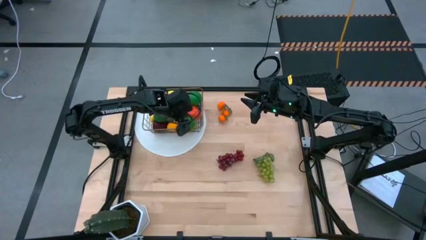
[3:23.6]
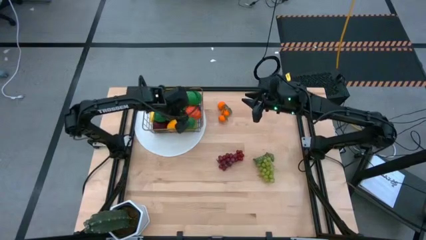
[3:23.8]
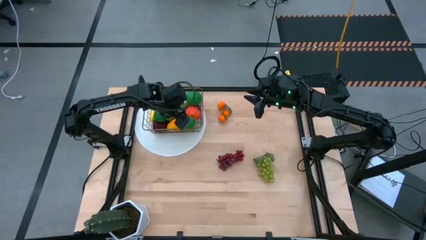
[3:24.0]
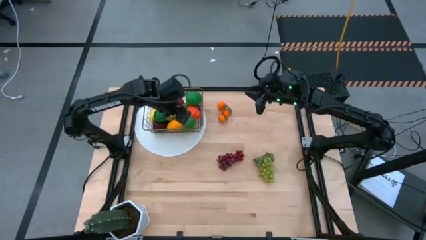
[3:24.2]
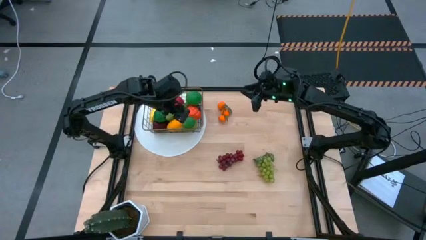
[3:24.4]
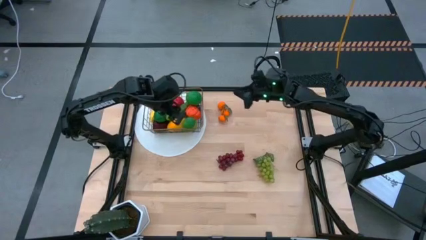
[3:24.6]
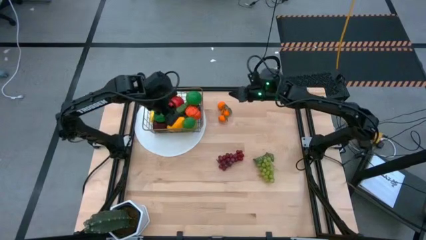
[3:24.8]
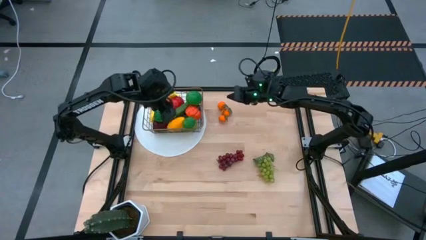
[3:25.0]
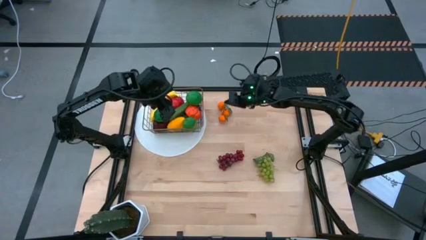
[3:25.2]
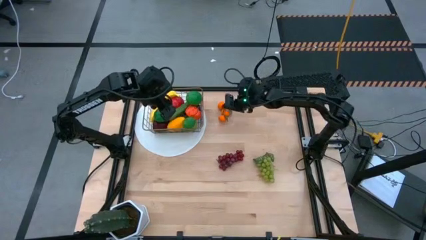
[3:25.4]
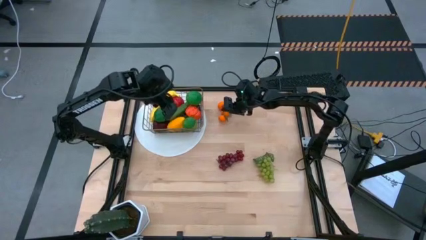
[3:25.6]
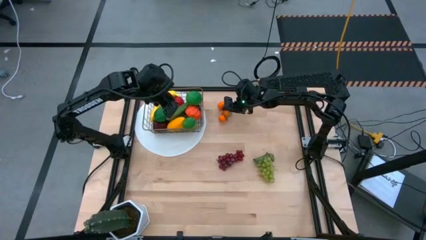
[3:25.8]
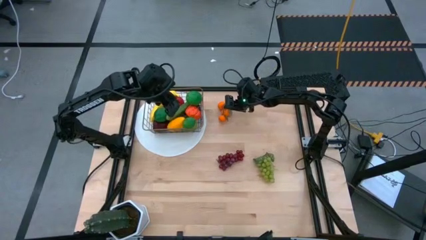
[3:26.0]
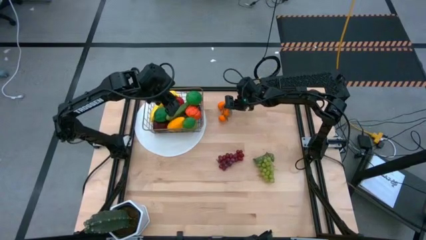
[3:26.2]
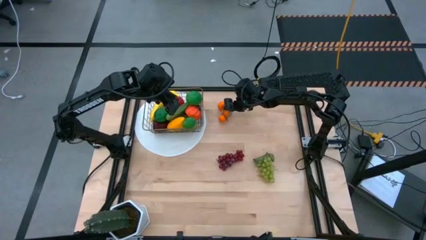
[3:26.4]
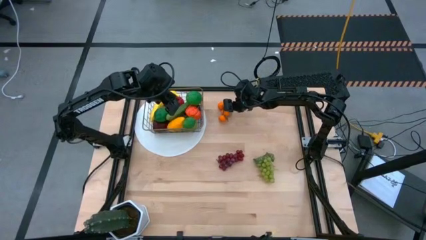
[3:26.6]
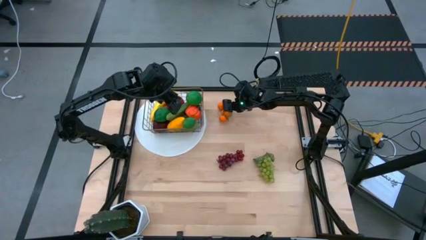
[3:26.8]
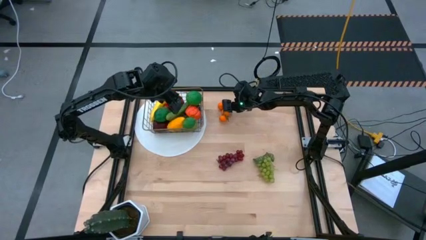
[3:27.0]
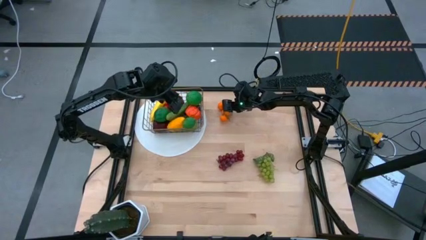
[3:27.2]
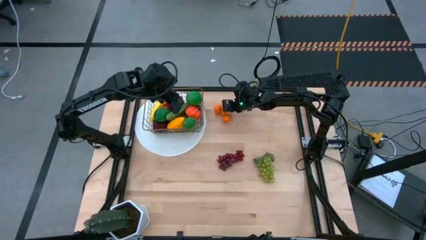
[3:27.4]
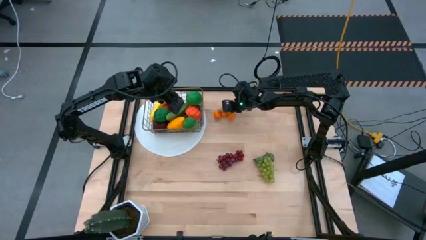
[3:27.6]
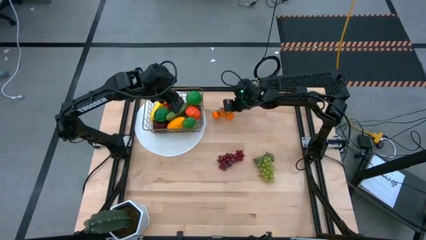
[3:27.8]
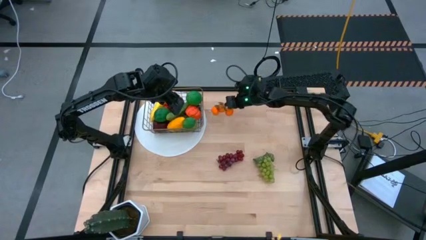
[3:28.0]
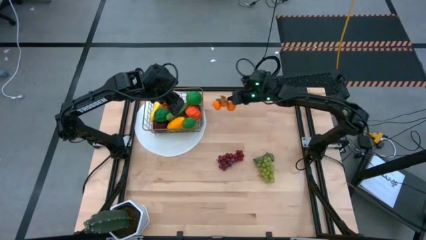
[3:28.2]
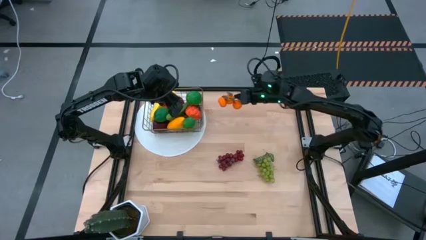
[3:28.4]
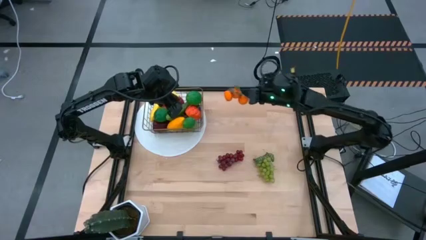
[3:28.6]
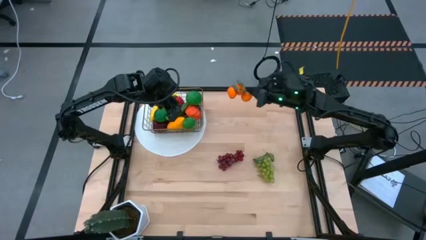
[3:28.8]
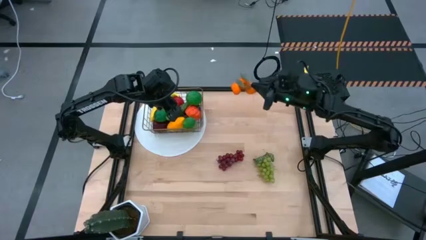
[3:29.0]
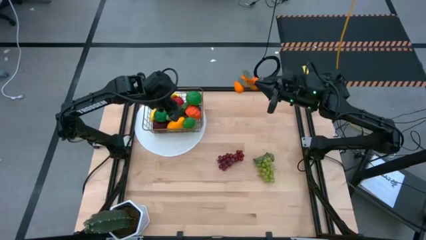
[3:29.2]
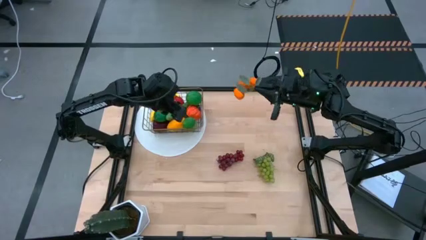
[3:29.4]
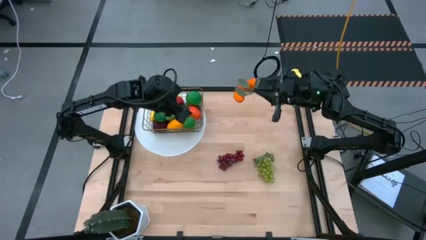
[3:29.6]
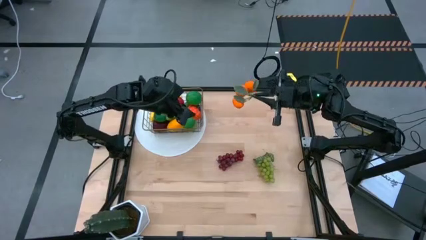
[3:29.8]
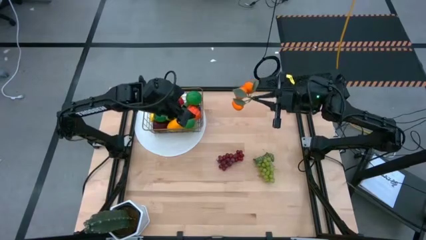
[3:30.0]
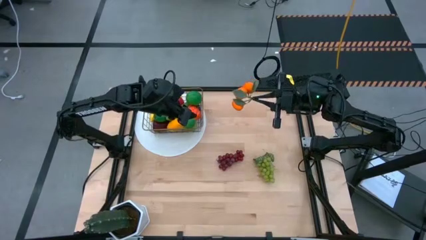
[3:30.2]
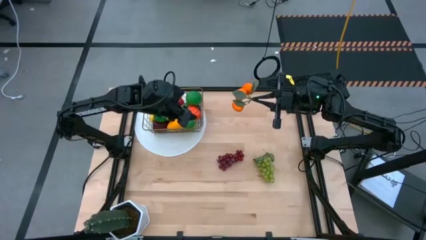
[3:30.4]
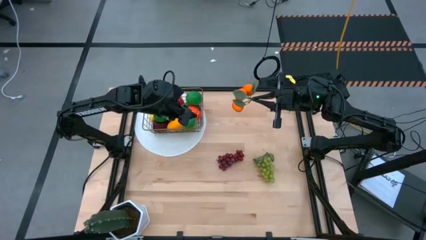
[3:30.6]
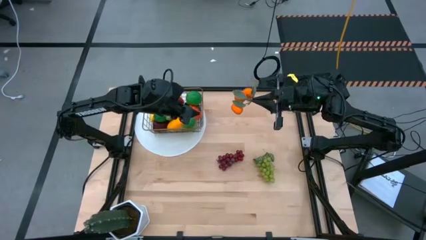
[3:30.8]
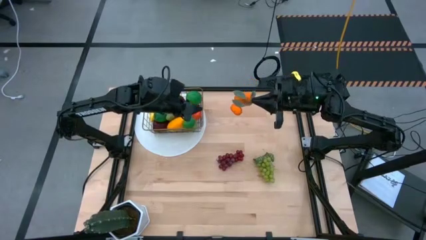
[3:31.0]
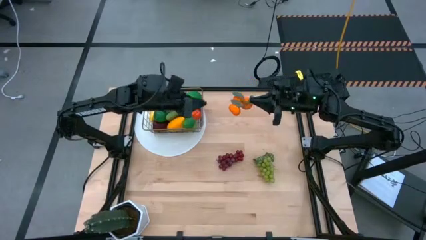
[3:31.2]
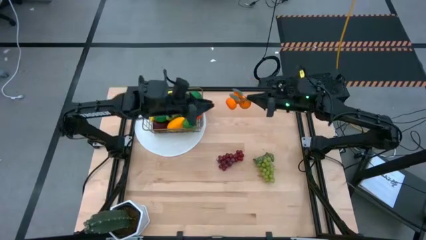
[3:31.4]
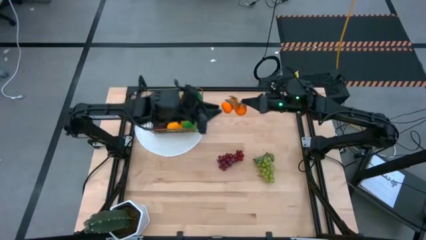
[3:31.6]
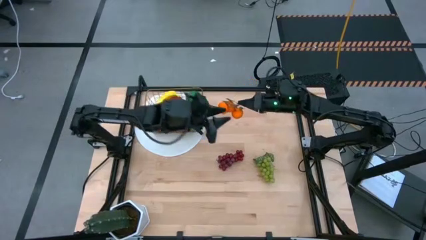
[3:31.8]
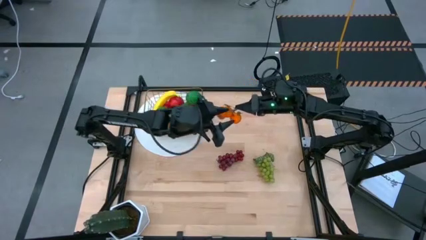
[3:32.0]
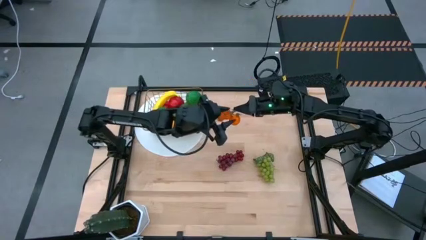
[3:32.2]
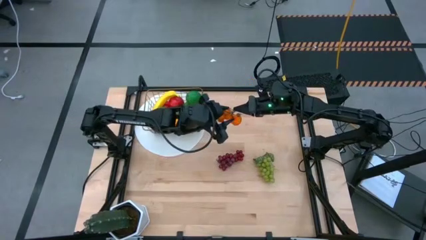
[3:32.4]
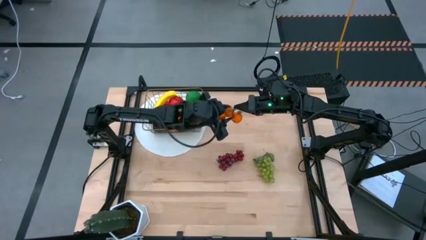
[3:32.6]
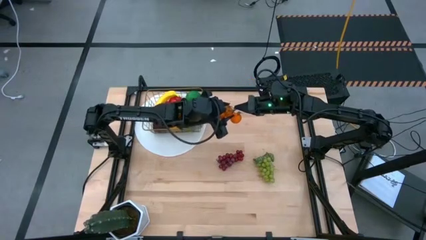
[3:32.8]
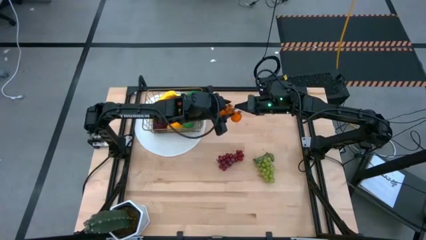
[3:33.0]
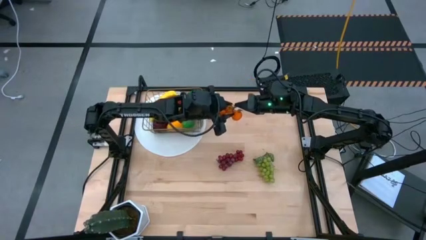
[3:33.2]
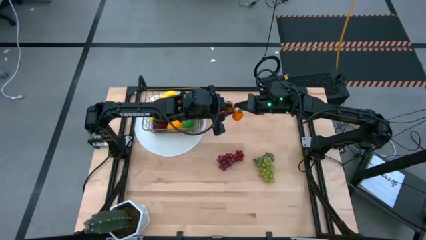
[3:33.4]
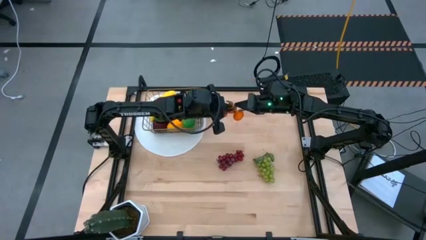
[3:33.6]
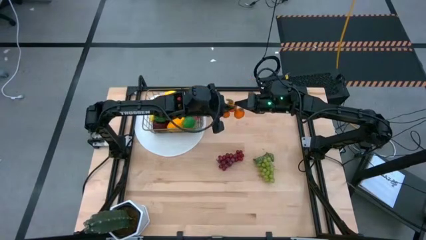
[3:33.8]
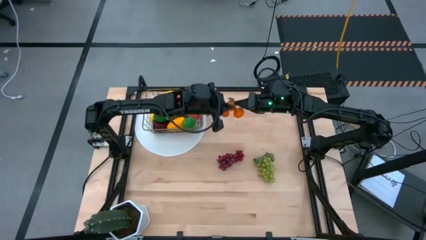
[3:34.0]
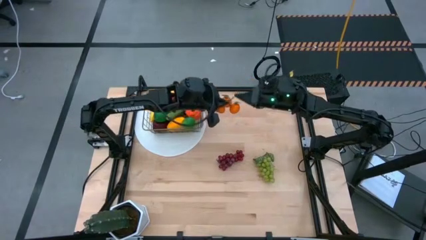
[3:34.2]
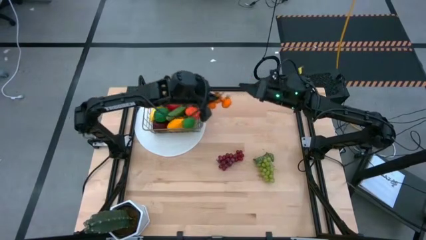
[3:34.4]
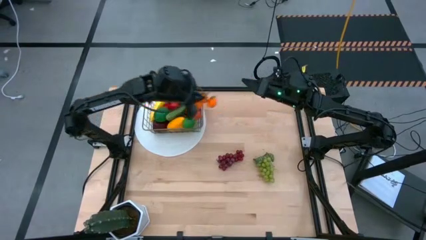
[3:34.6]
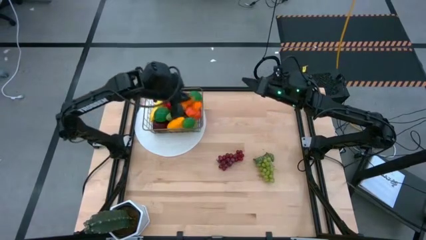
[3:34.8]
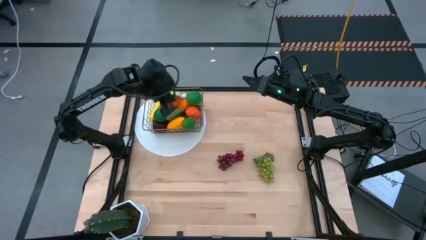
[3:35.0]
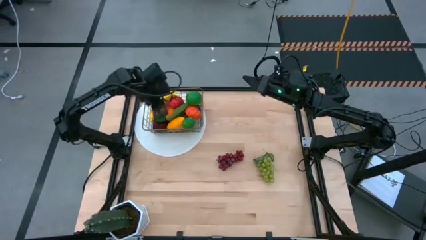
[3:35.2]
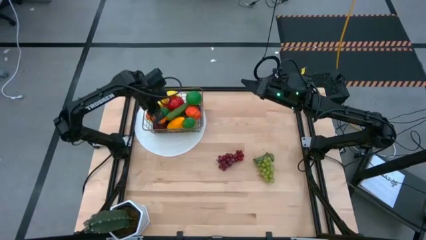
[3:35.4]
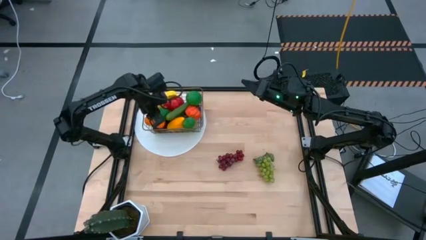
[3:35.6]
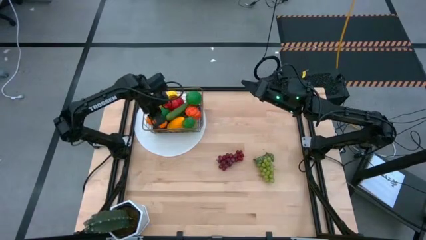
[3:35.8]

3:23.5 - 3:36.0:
Task: Build produce basket
Put the oranges into the wired basket

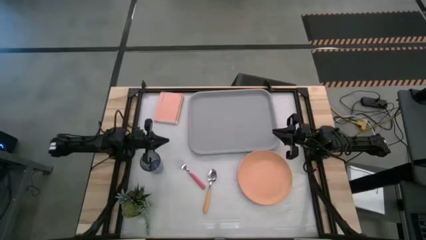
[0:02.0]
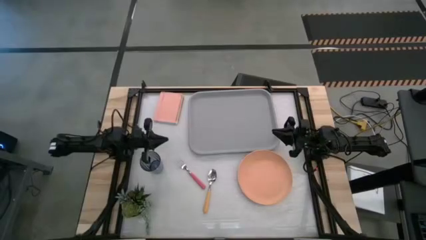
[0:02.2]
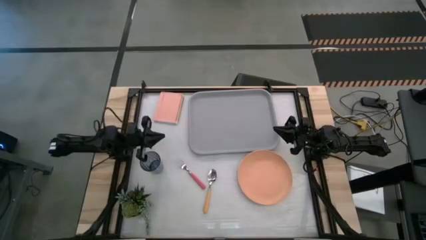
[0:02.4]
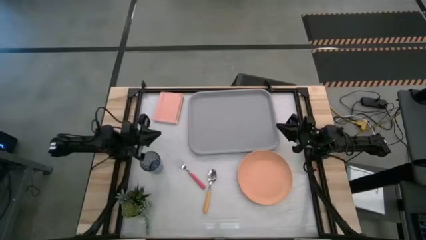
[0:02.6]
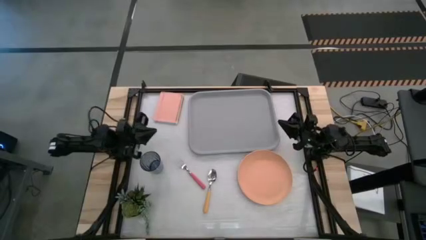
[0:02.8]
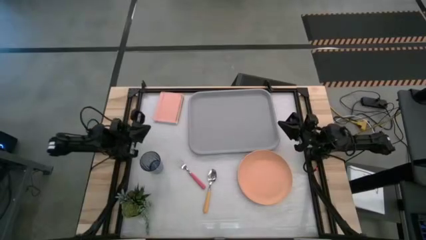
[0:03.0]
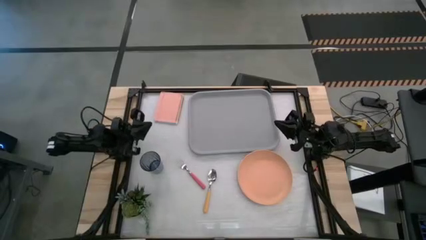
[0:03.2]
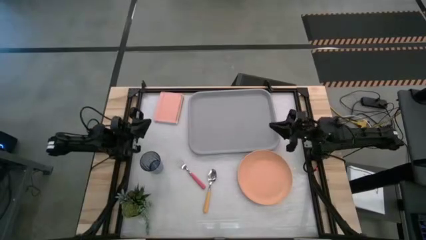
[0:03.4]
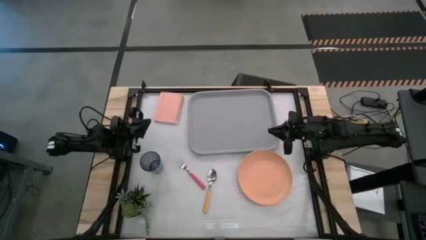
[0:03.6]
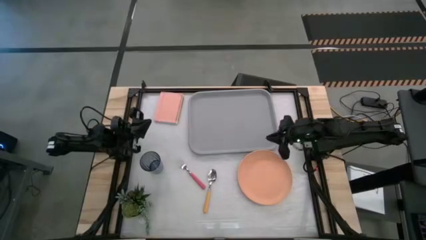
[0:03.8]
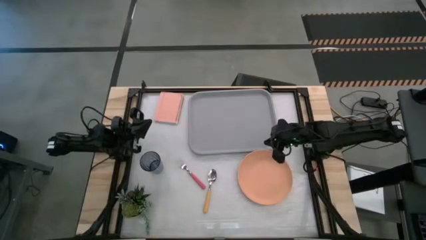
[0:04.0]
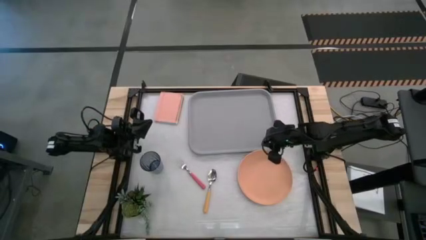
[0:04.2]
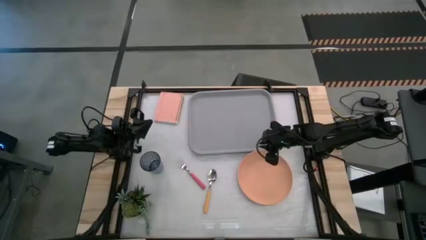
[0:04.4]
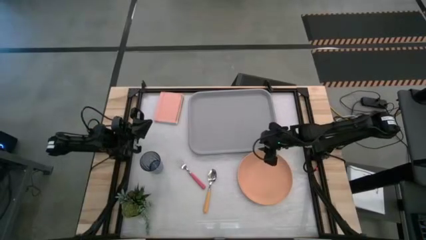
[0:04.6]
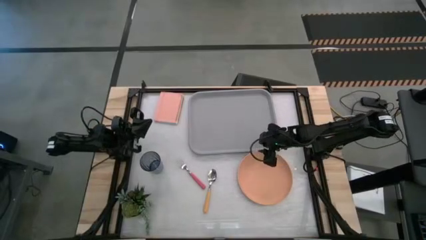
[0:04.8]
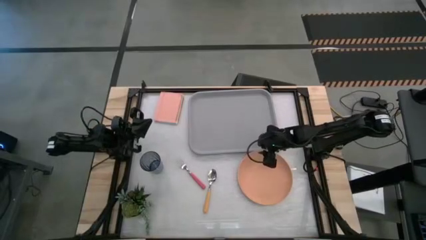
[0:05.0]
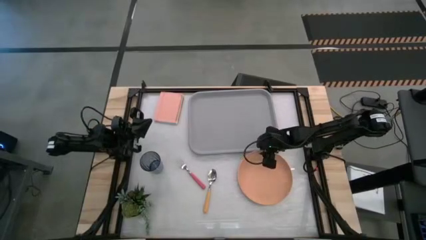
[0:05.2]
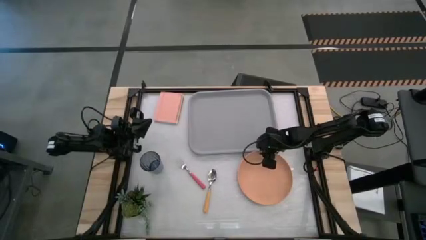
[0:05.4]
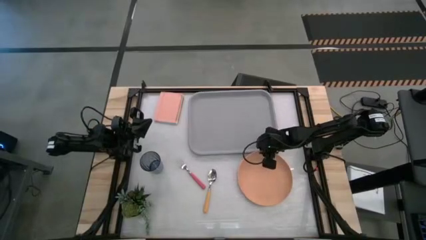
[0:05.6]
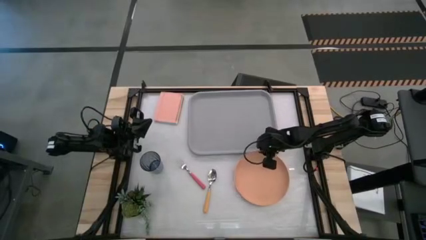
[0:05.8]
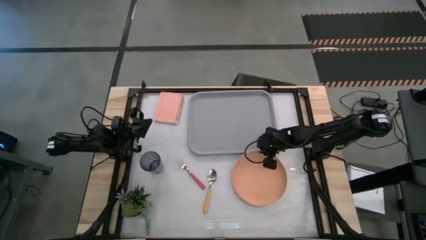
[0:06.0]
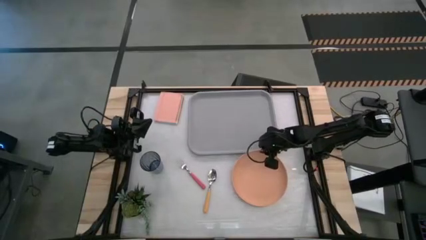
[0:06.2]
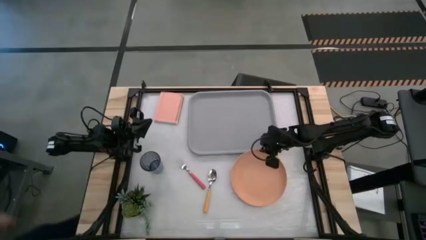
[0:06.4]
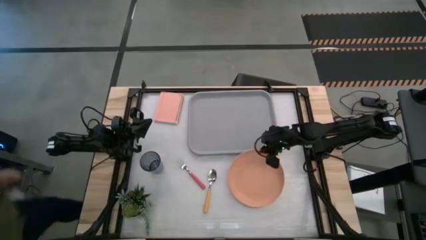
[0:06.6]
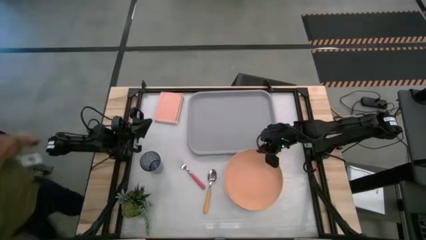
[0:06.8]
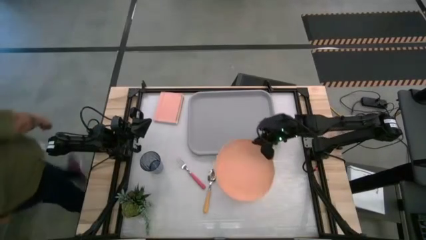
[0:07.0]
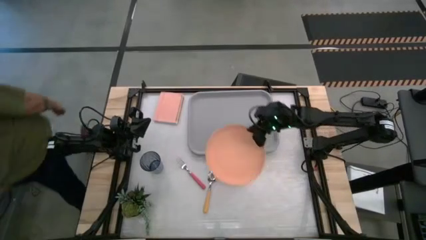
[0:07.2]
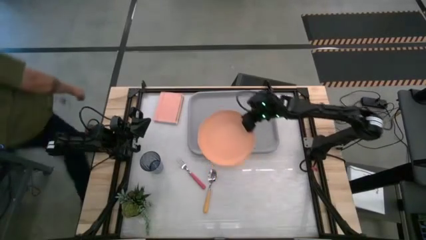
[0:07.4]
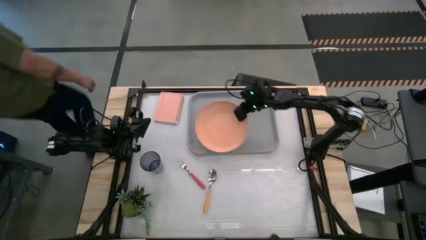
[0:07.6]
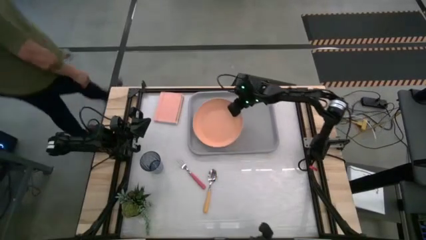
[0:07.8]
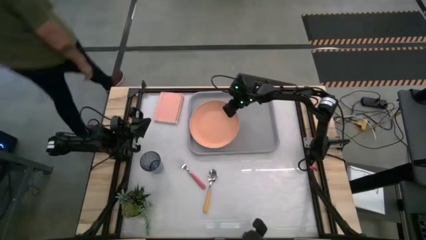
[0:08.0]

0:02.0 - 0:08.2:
Task: Pick and place plate/cup/fork/spoon on tray
Put the orange plate on the gray tray
